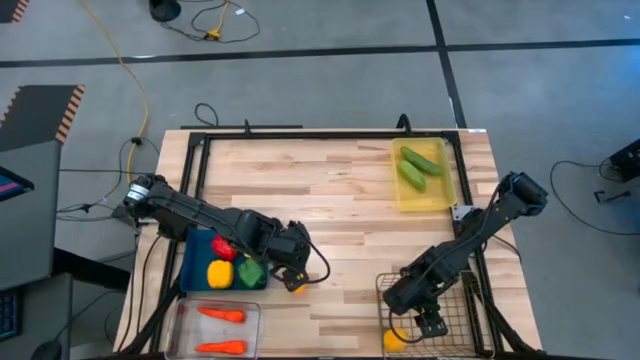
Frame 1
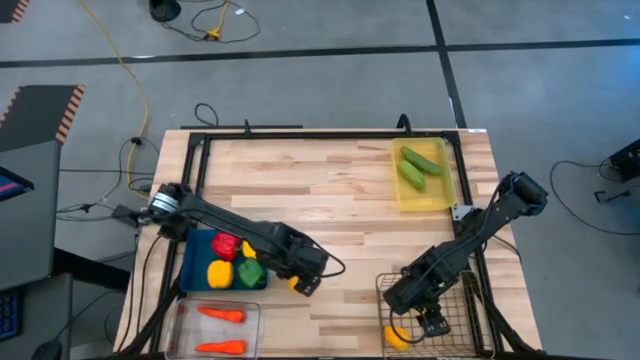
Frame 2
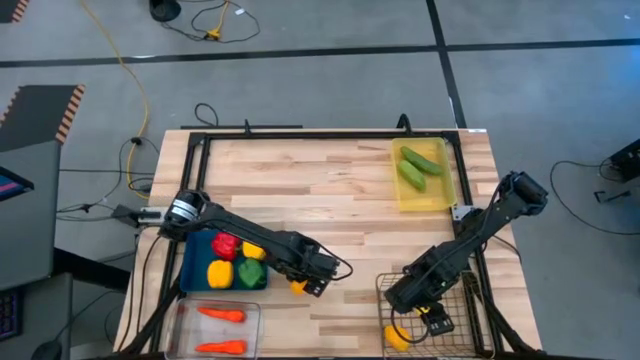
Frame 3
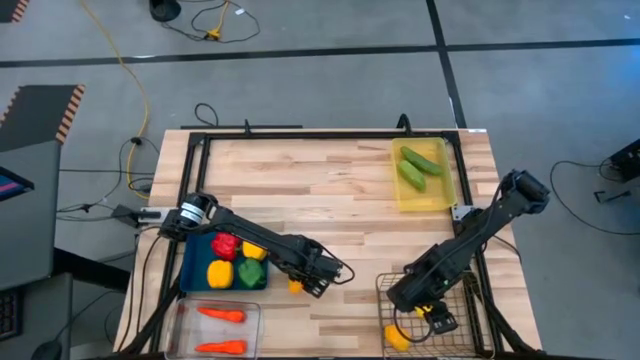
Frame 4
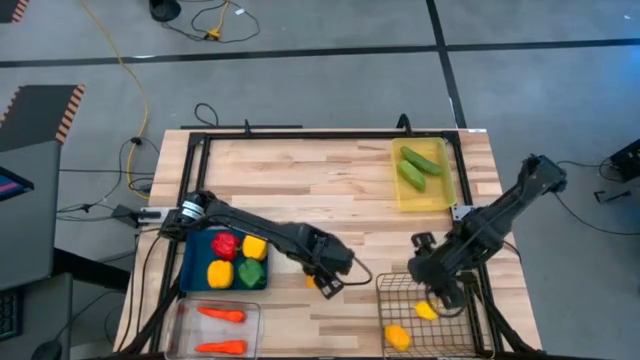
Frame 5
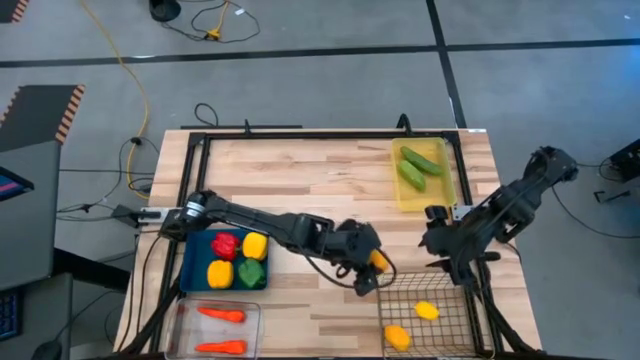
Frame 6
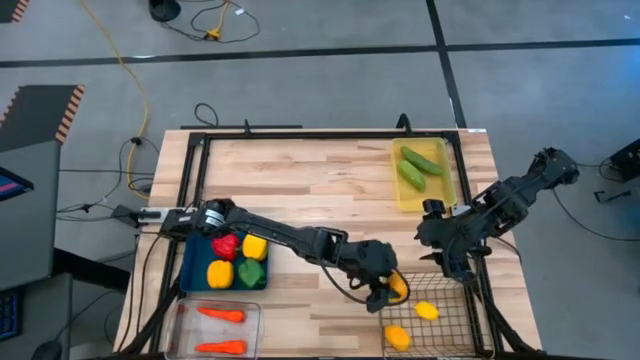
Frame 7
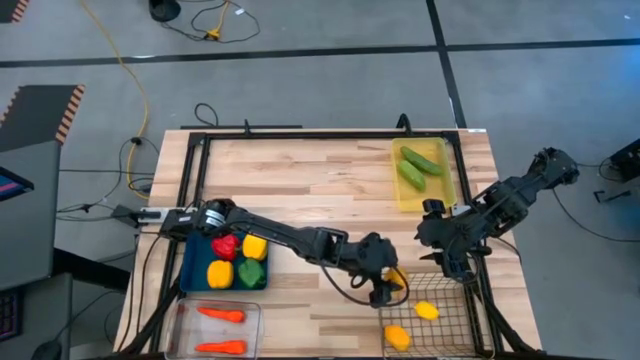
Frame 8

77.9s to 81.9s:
Task: Sort produce into baskets
Put the yellow mango into the wire basket

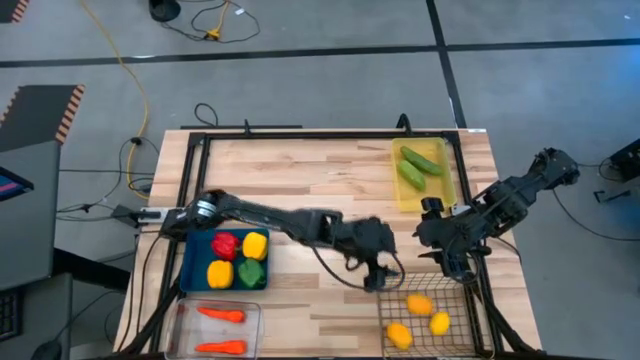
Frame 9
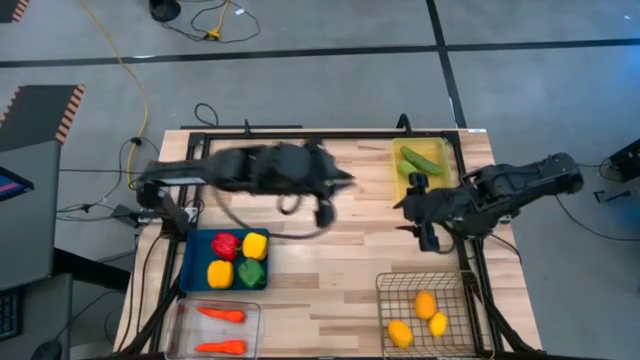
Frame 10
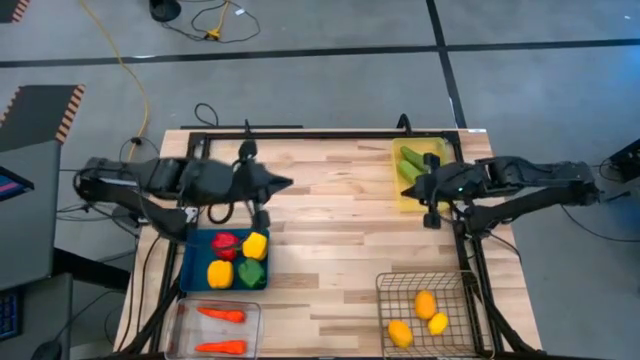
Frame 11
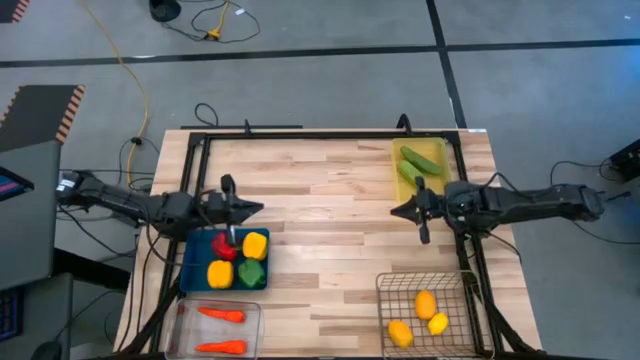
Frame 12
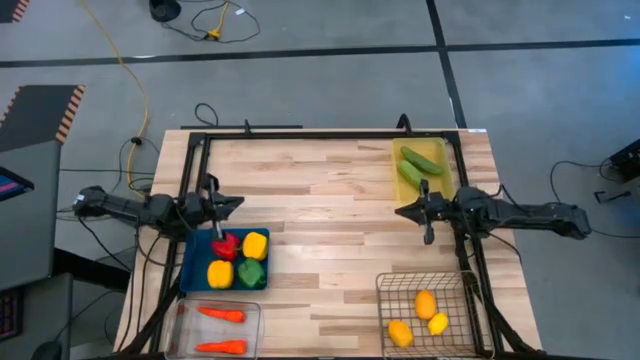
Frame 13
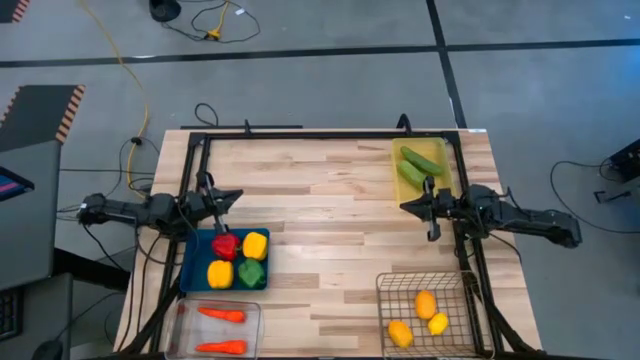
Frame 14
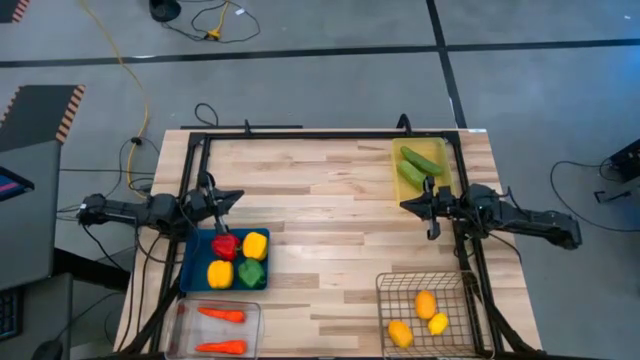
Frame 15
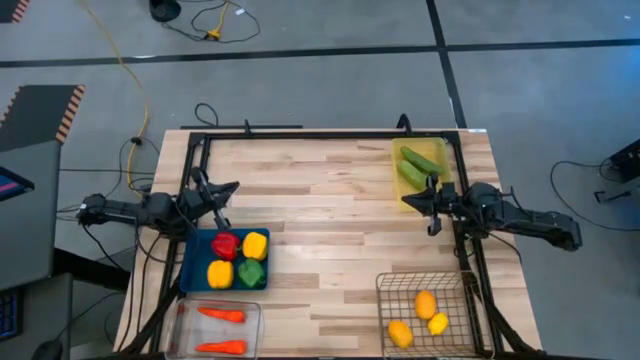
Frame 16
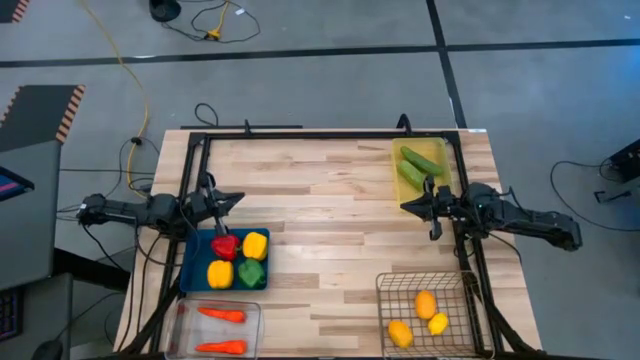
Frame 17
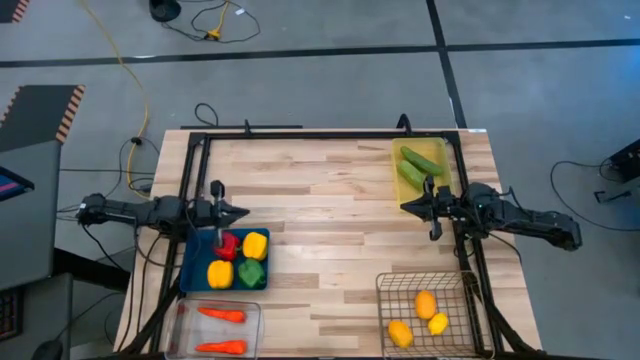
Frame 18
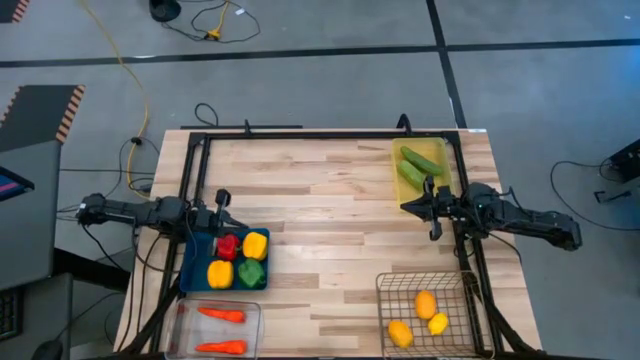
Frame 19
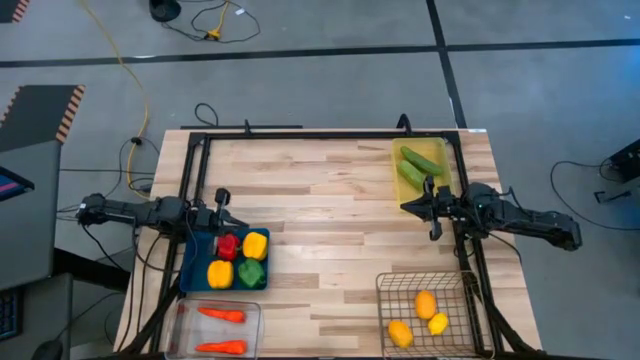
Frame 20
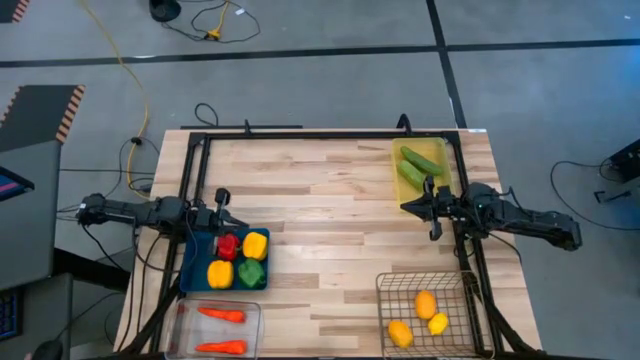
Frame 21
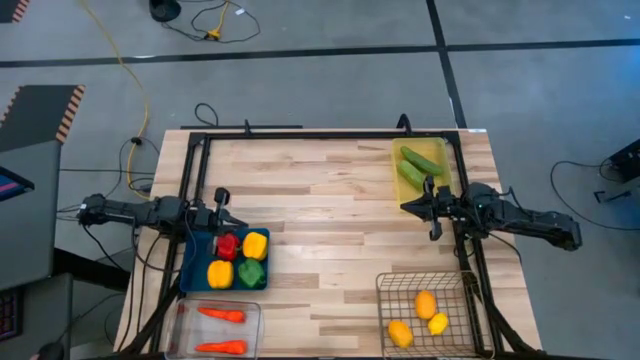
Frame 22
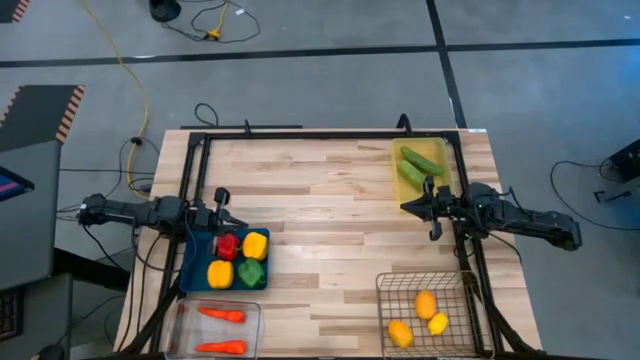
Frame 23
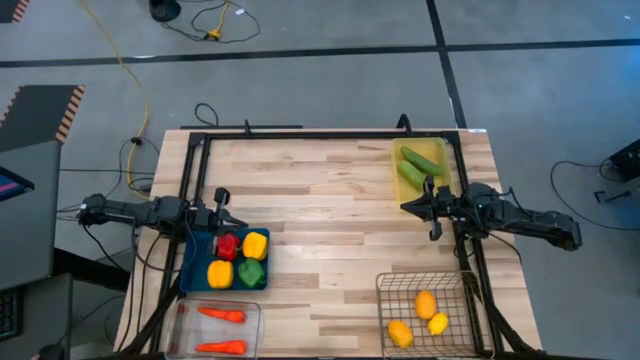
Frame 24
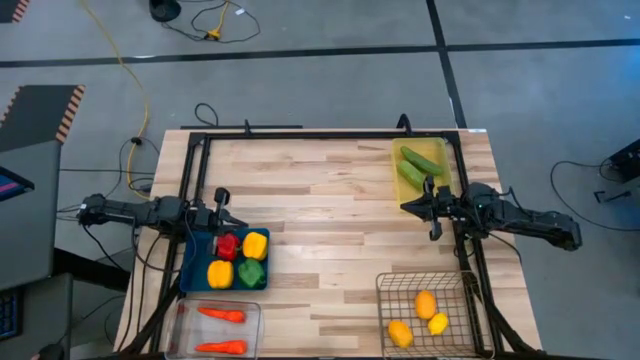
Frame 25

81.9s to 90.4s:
Return to Home Position

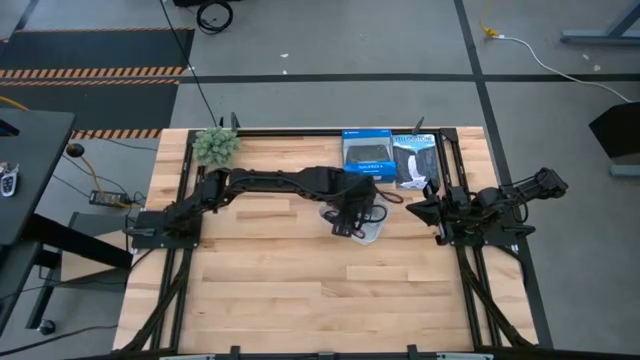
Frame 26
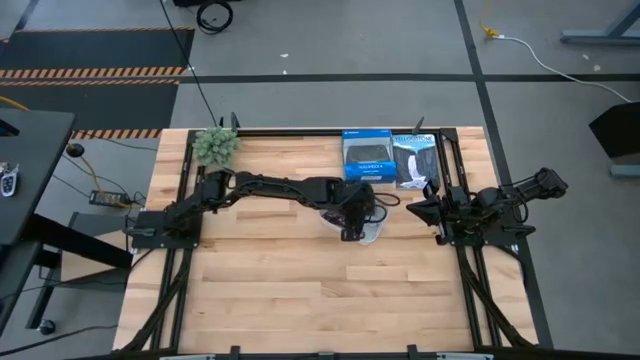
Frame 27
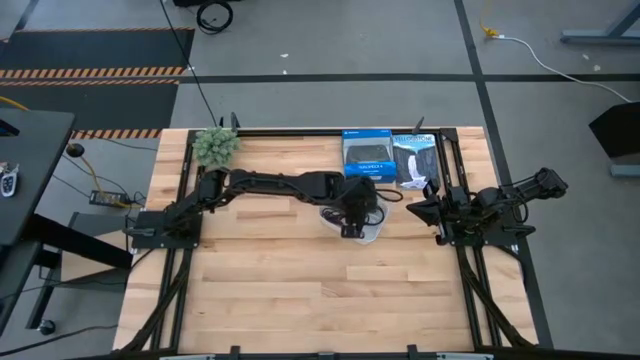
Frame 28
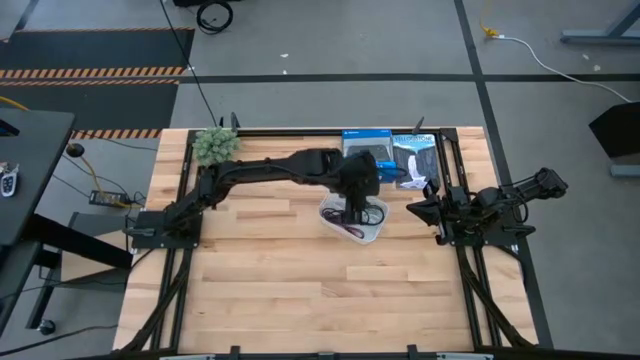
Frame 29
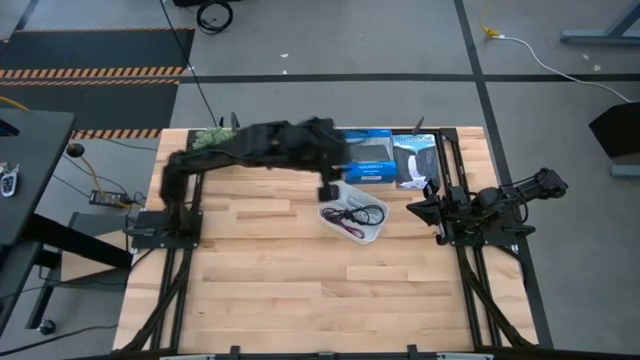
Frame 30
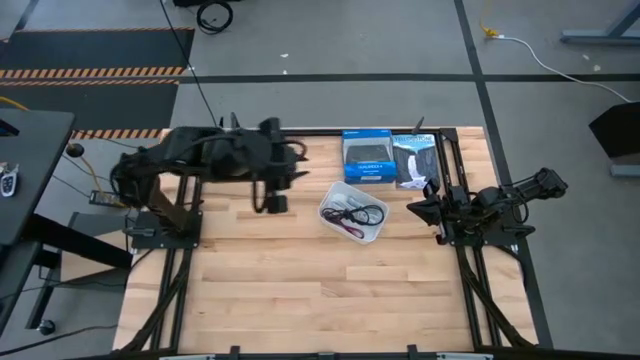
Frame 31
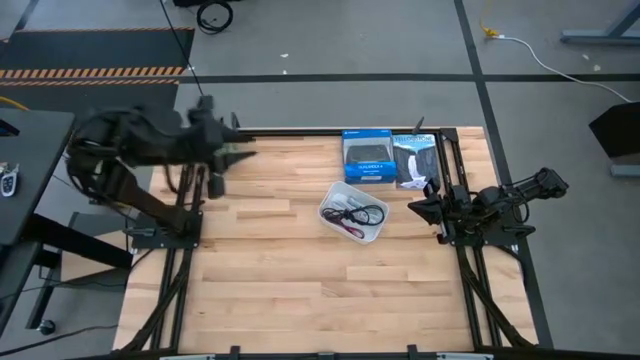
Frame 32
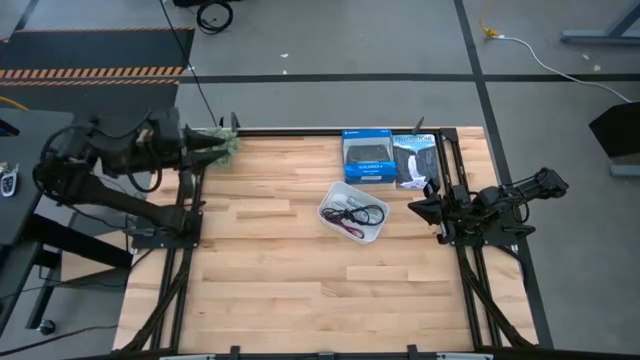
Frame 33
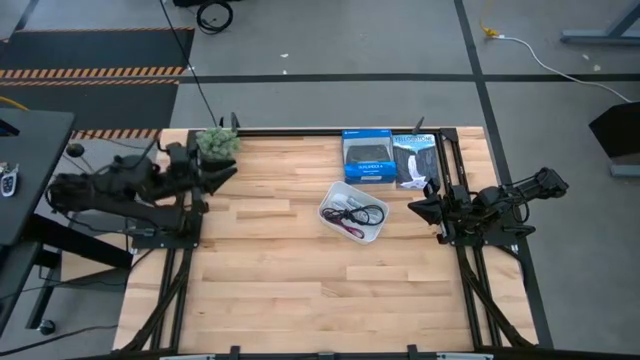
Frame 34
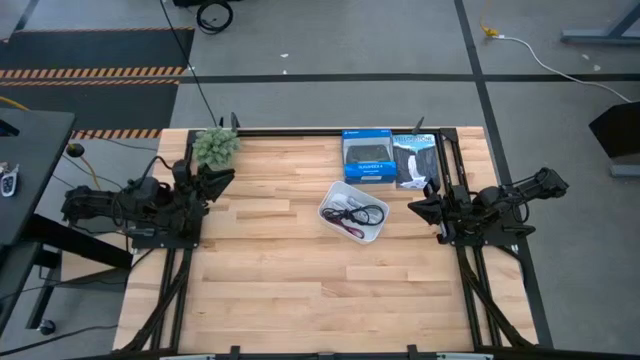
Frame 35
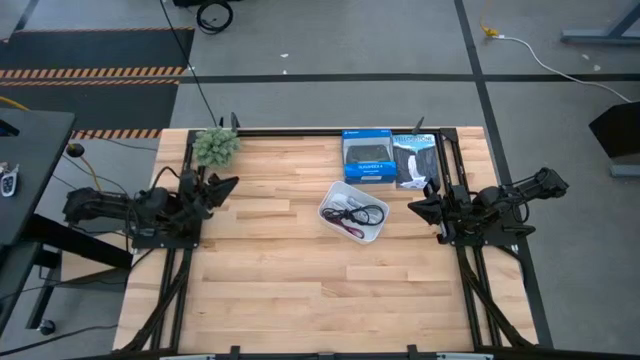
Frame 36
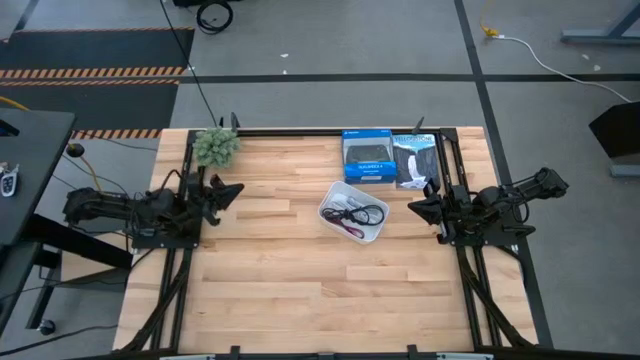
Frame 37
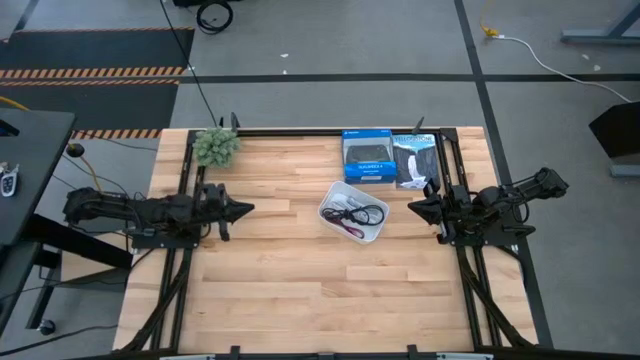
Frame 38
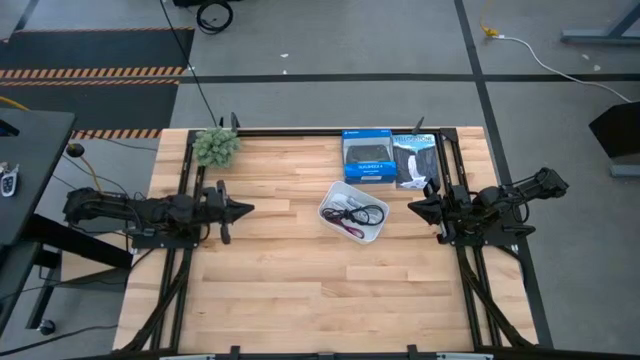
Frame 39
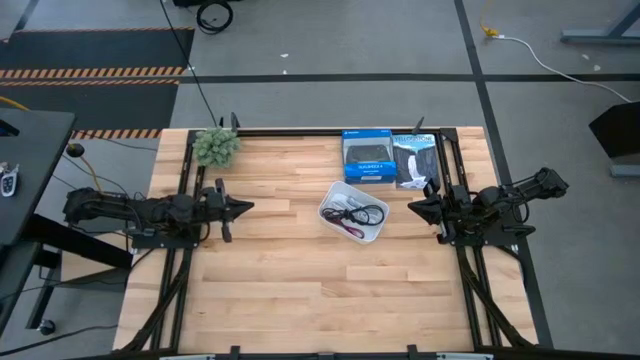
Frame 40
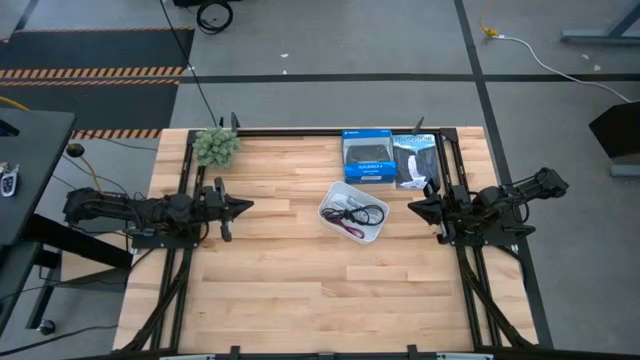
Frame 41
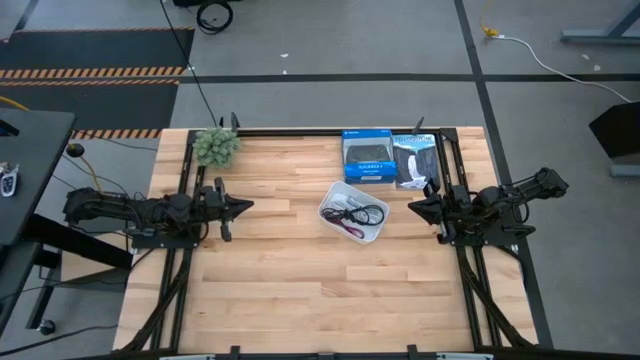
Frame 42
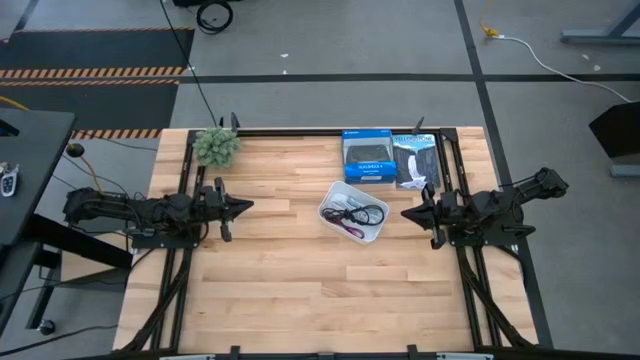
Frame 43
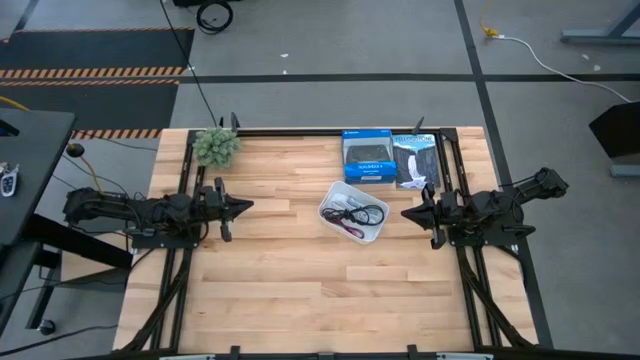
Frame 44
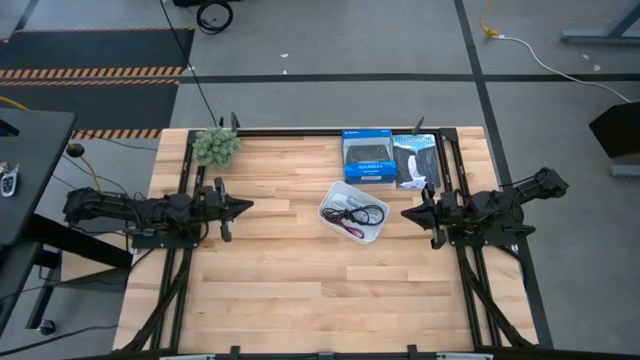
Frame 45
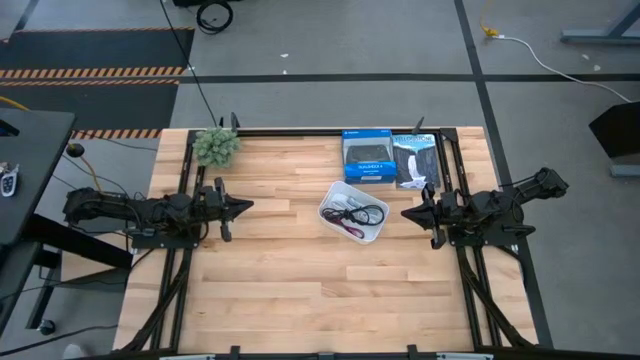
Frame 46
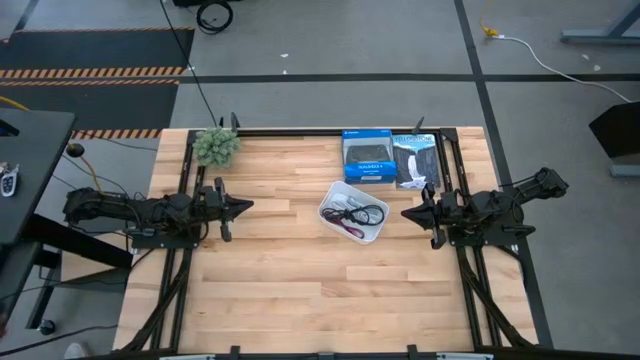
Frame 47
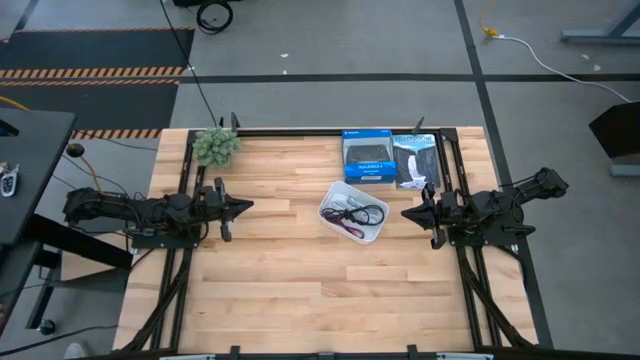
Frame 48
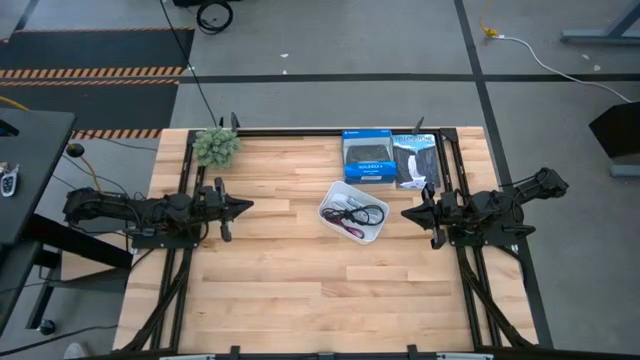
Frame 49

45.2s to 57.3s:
Task: Pick and place USB-C Cables
Return to Home Position
